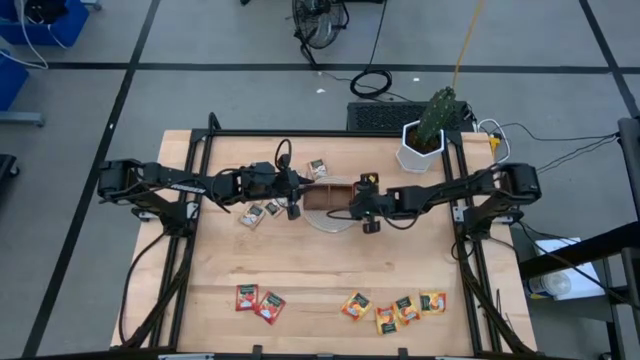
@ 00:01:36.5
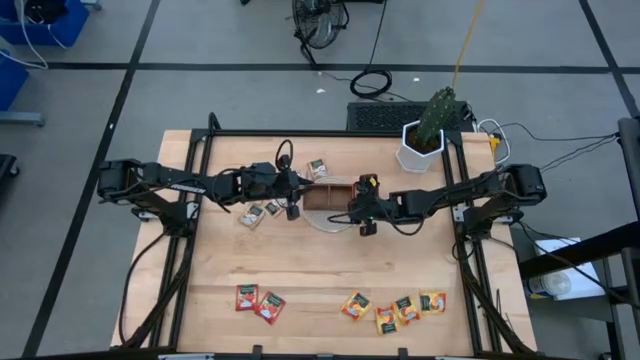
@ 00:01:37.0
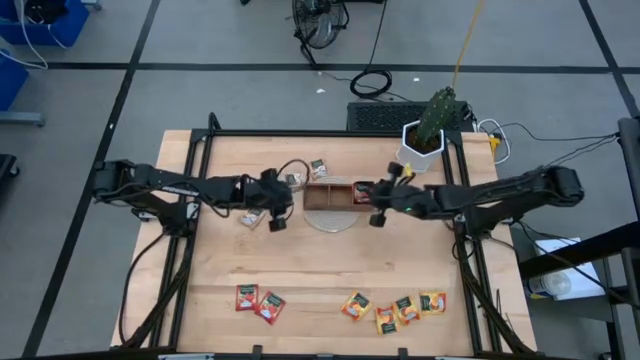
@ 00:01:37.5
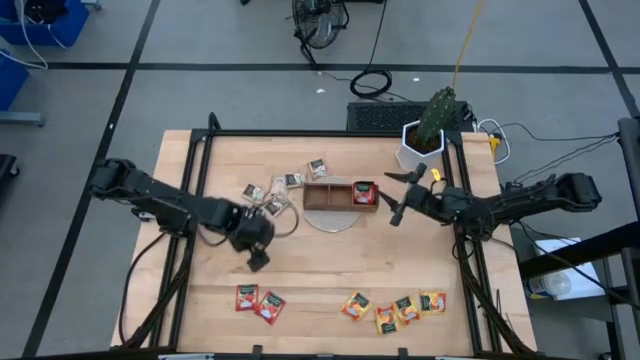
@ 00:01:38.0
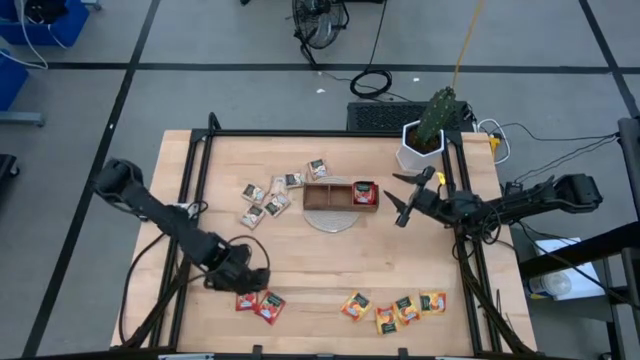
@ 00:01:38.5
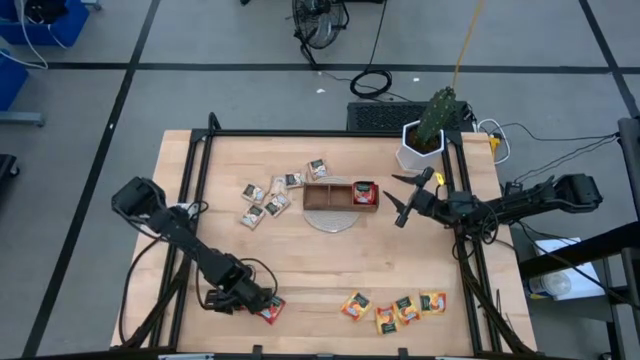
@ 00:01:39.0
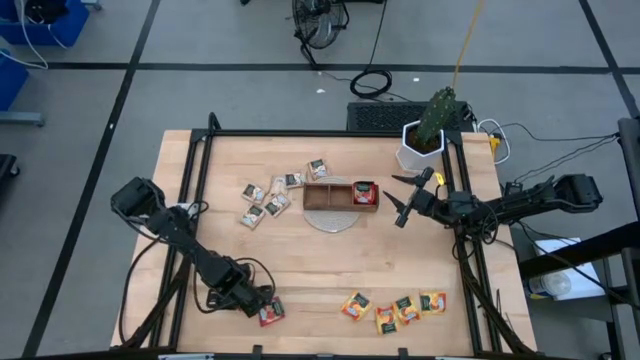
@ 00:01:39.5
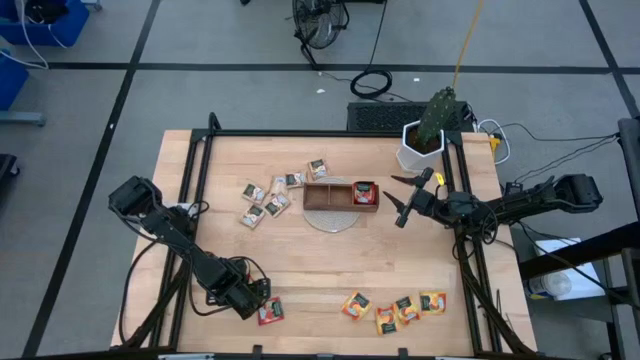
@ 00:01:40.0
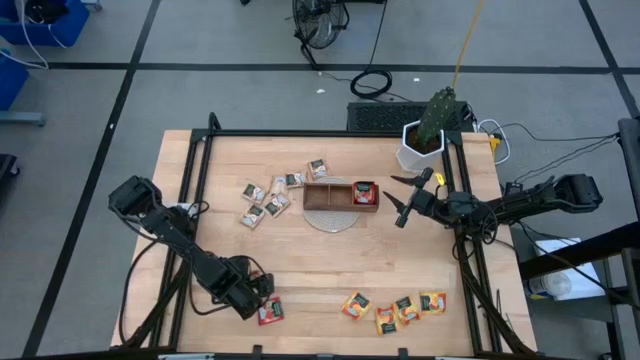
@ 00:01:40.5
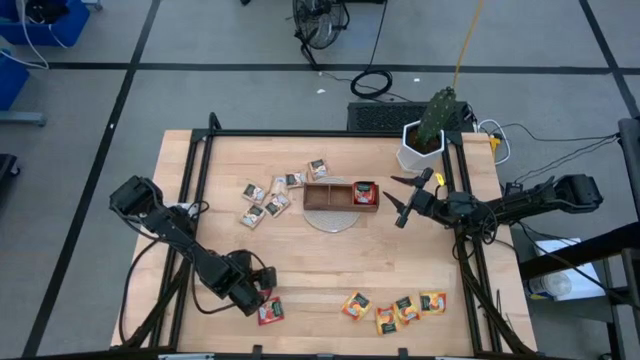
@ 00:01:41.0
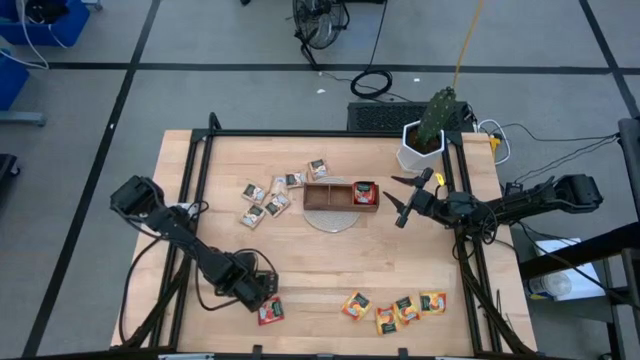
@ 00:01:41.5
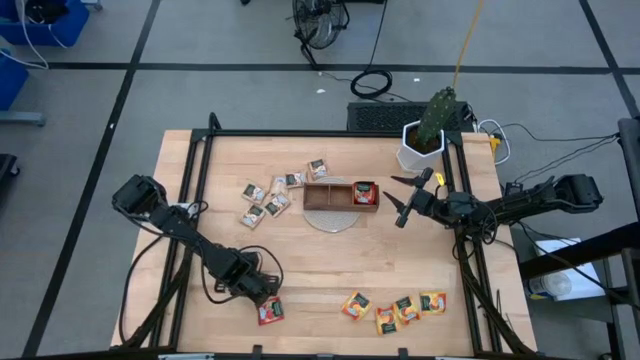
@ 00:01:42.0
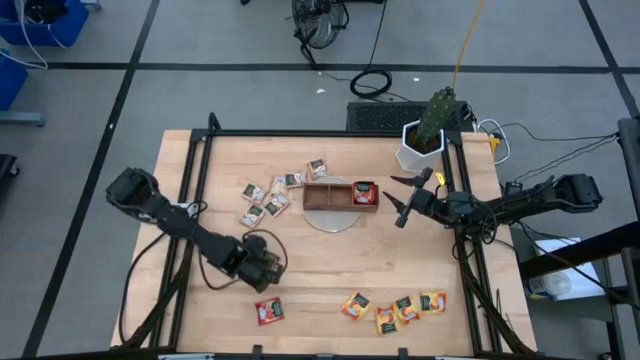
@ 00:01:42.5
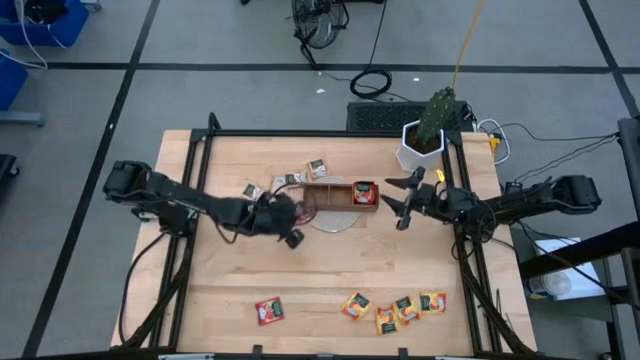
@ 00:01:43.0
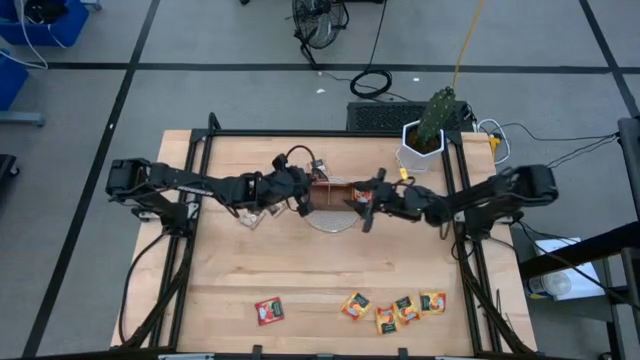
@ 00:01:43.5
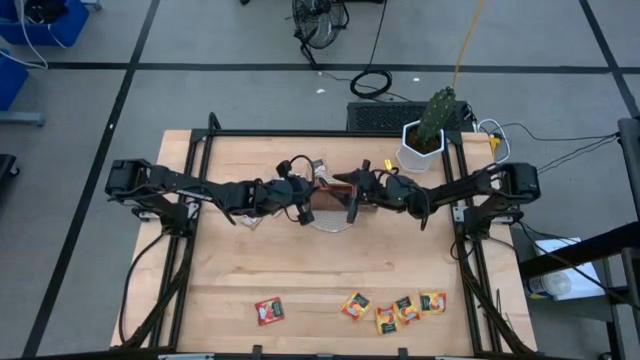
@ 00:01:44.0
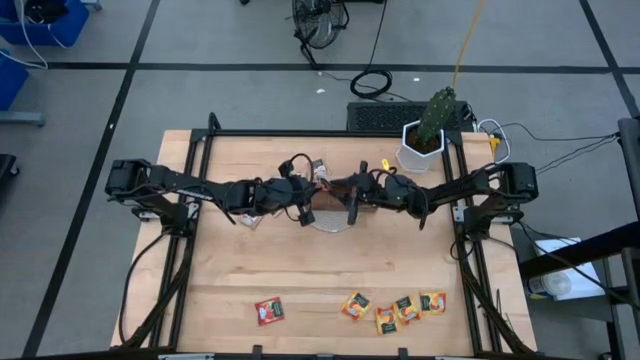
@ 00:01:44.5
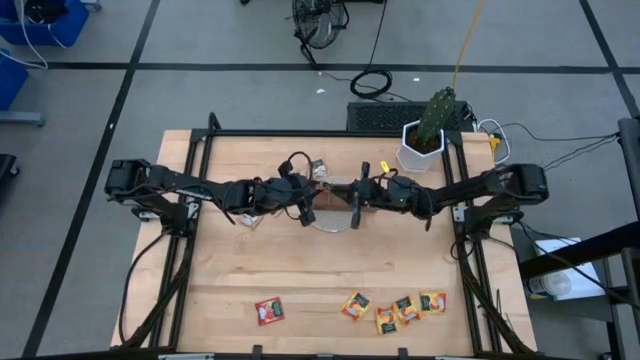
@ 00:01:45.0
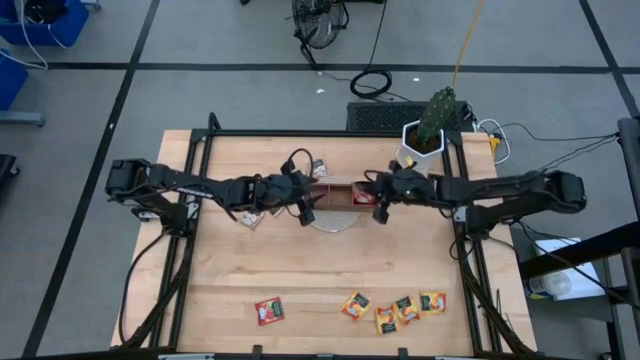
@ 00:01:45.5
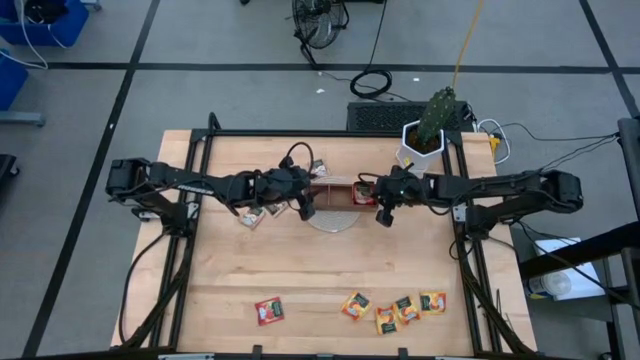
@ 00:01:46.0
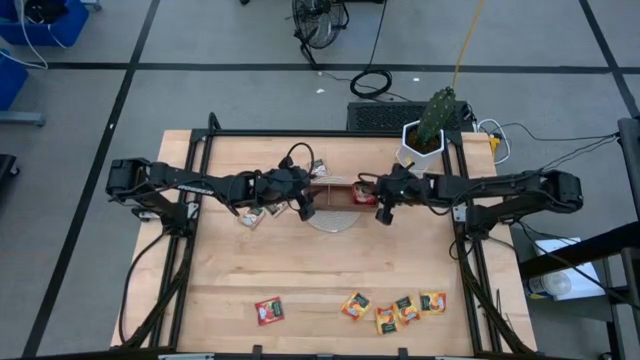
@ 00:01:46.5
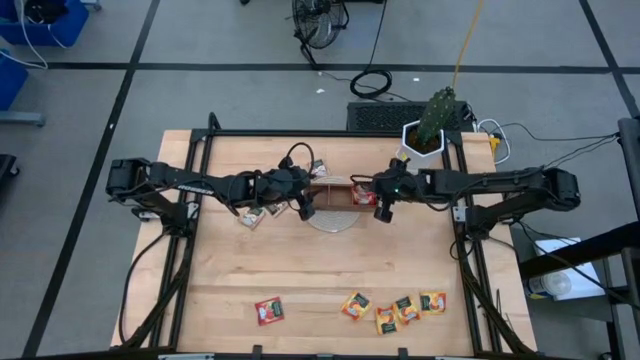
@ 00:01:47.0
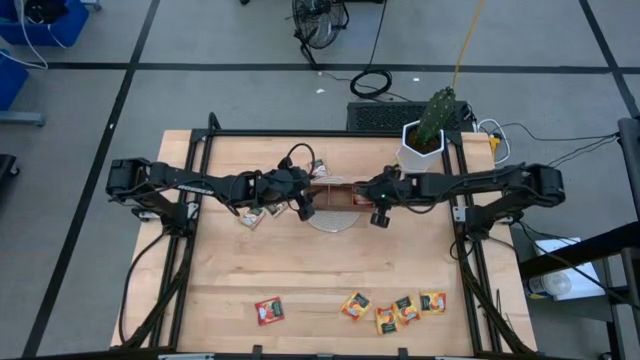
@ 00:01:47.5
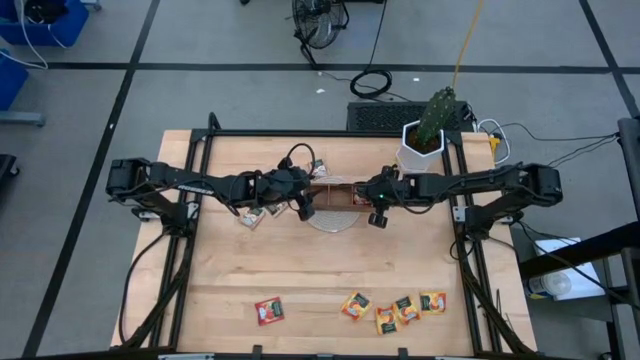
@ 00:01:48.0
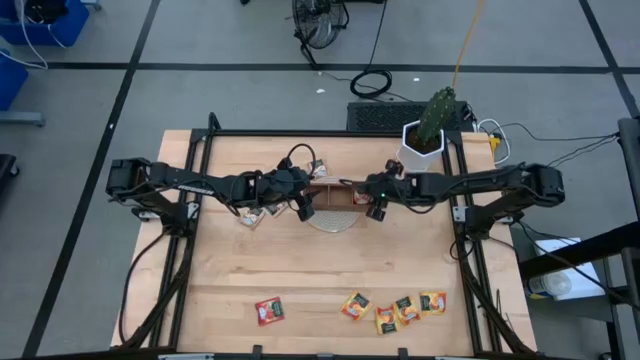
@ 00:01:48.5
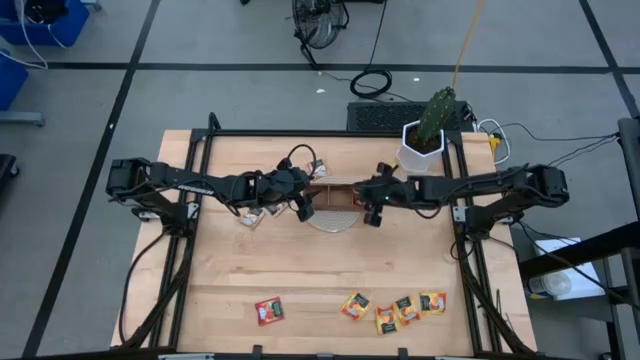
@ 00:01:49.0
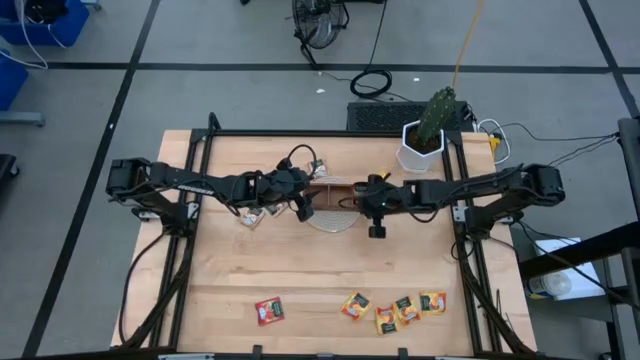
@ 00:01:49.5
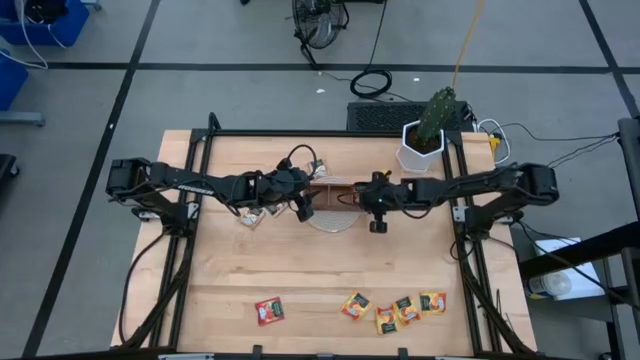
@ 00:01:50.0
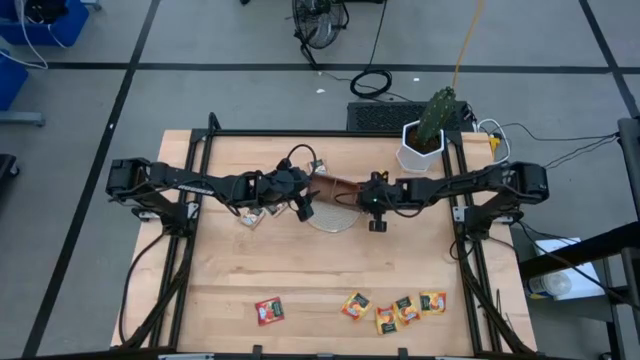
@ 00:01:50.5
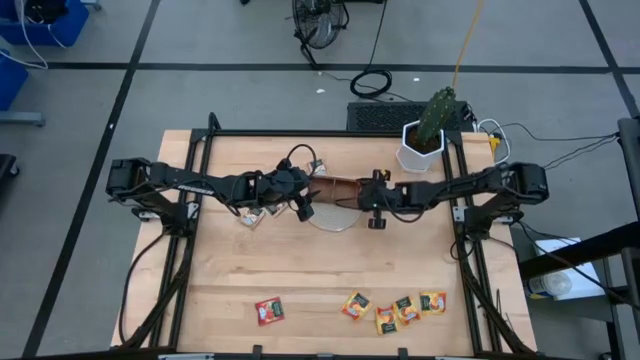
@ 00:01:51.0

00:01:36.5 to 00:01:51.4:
Task: Pick & Place Tea
Put the red tea bag into the right section of the wood organizer

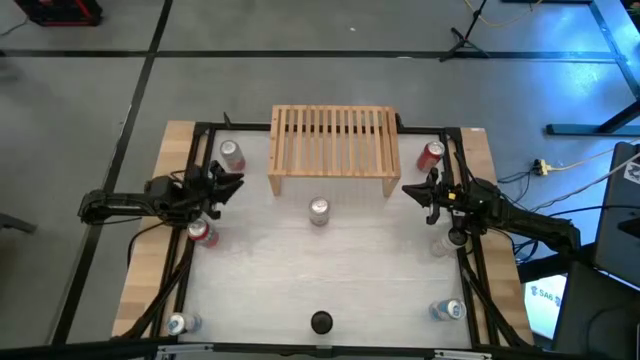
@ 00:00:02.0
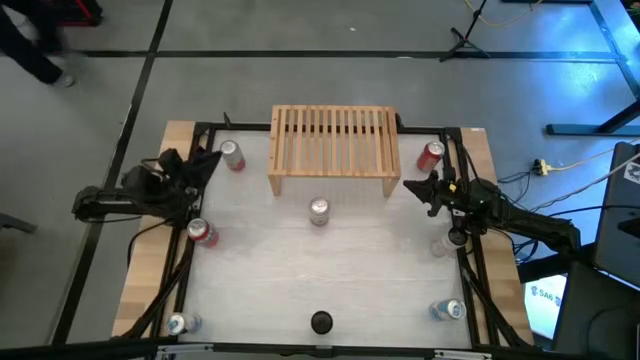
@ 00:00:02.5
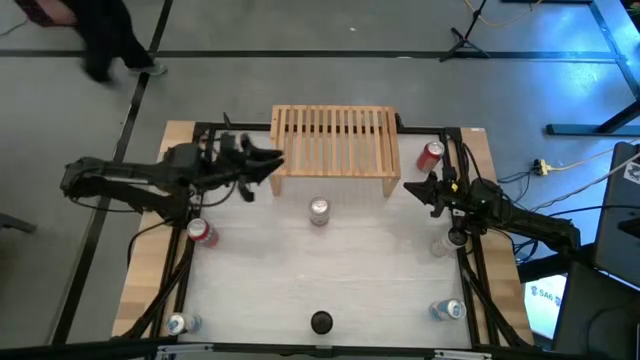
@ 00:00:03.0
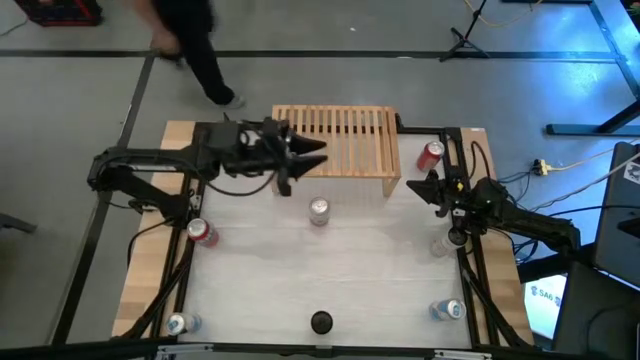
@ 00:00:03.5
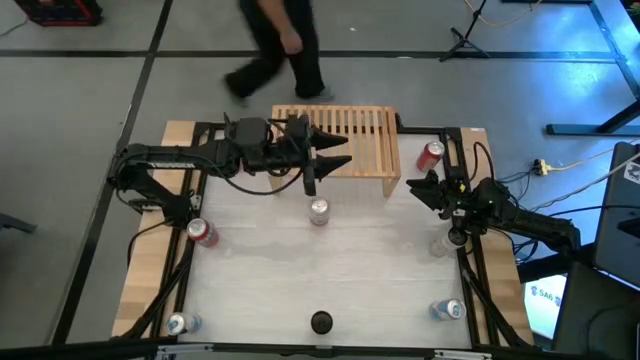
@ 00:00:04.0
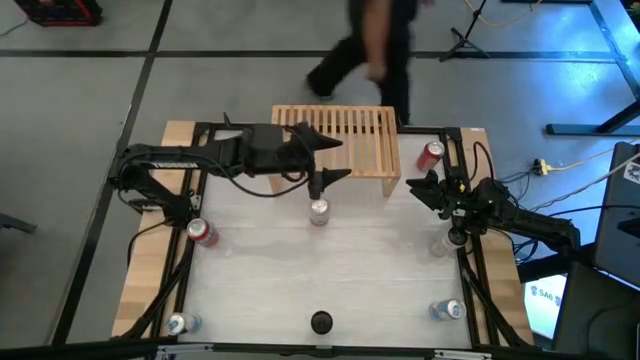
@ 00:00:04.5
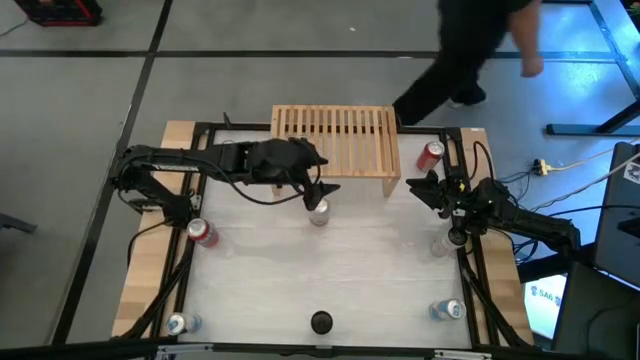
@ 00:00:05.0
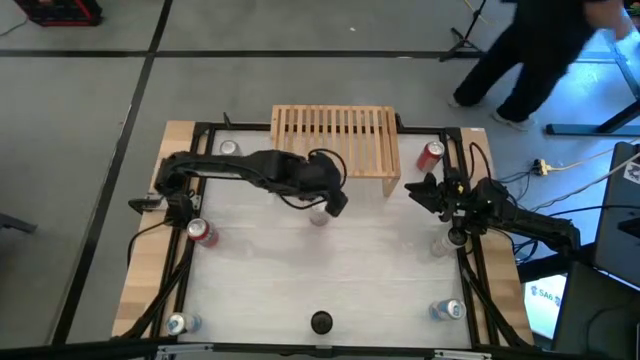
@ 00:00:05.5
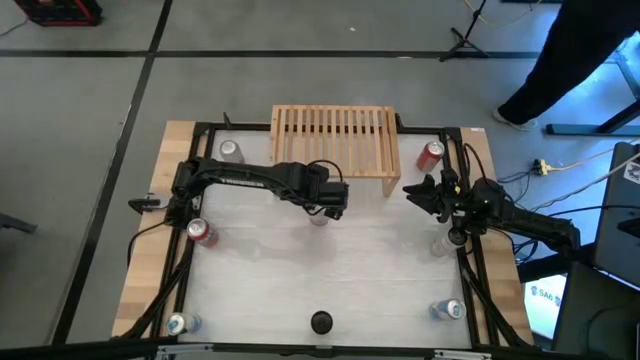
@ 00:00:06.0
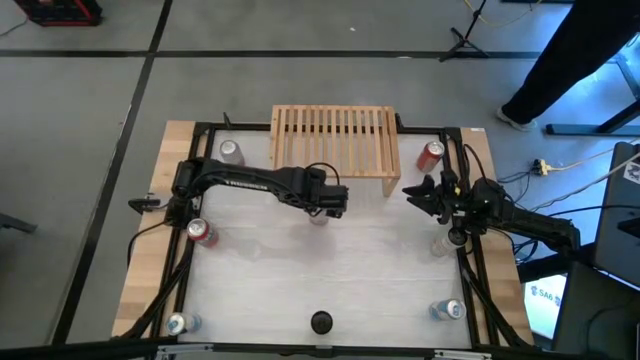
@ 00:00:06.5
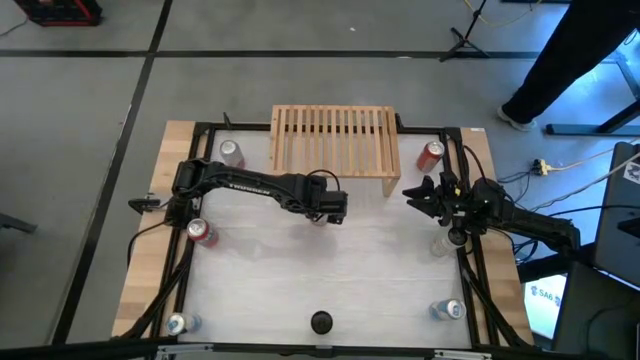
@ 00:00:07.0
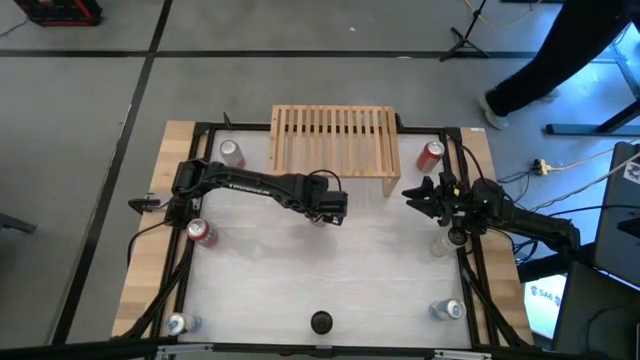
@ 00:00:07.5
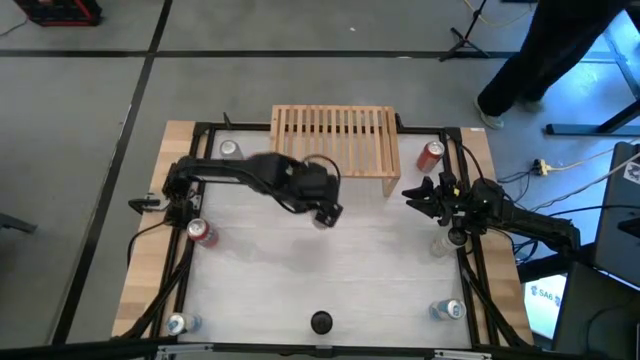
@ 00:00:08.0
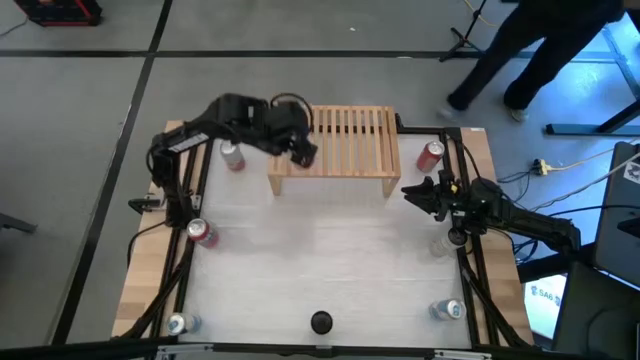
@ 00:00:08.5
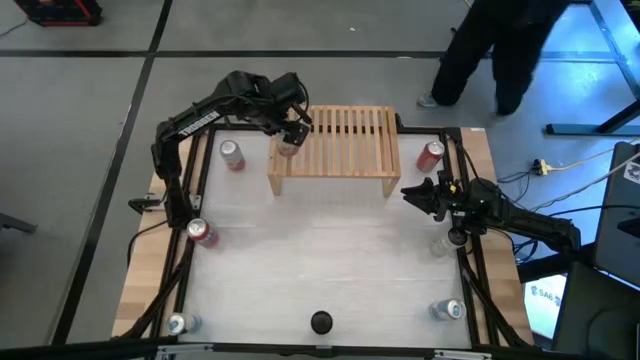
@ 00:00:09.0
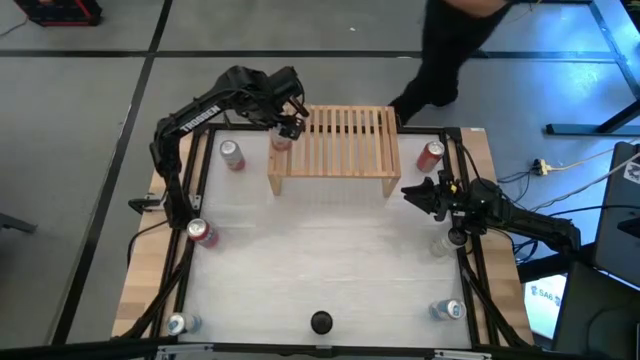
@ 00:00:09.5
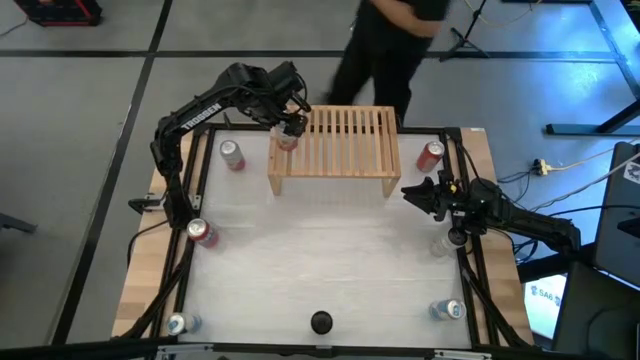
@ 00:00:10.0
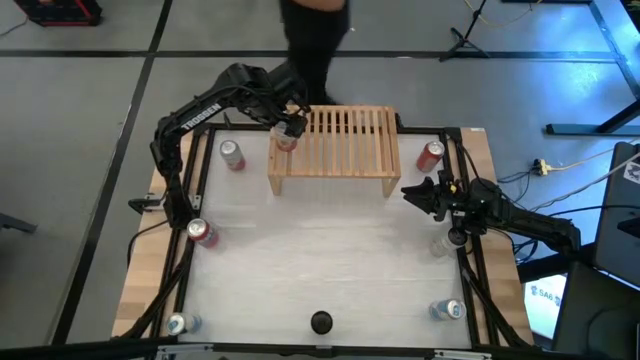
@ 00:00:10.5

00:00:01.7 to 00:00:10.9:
Task: Place canned beverage on shelf
Put the bottom pink white soda can on the shelf
